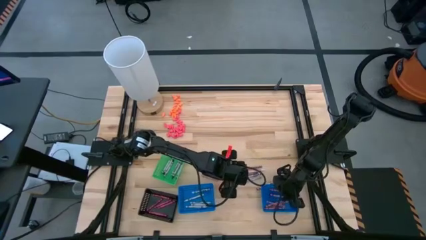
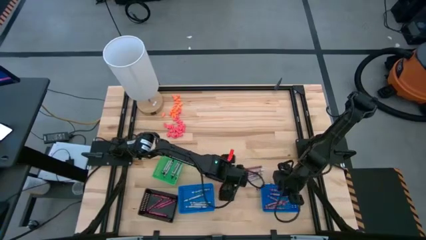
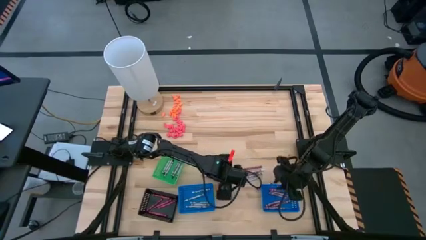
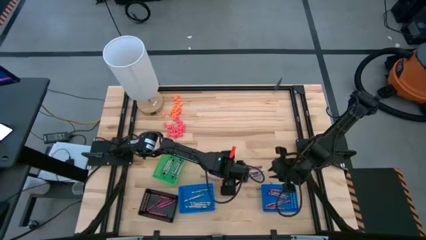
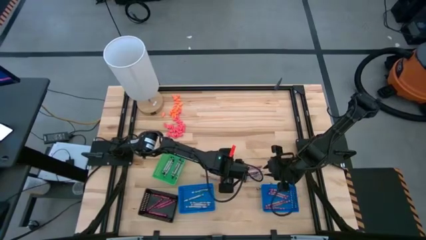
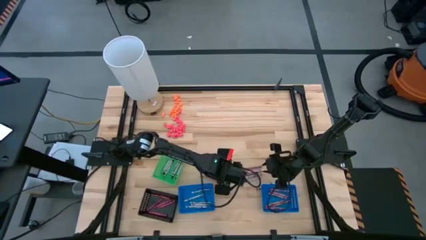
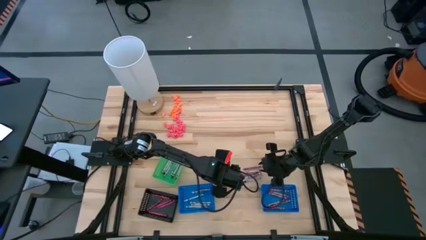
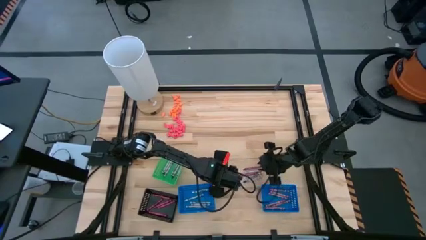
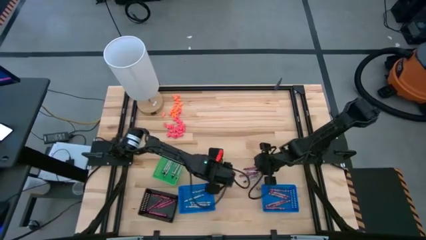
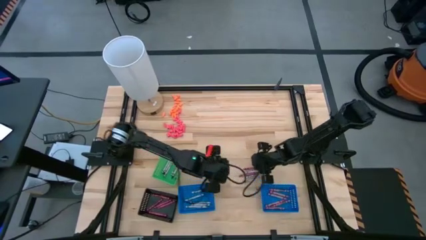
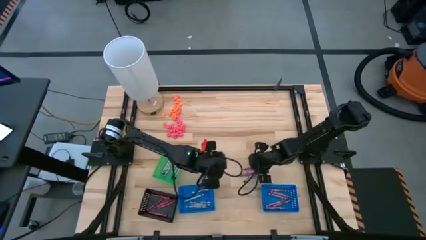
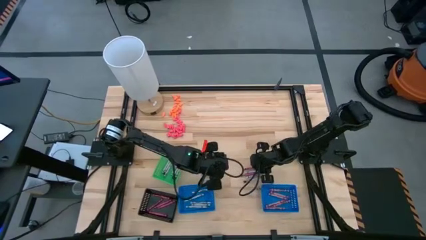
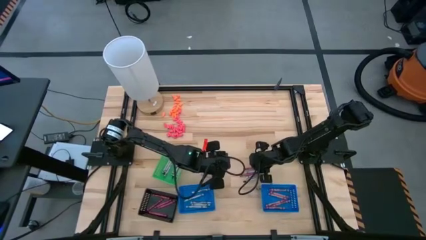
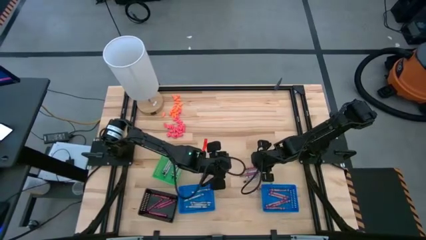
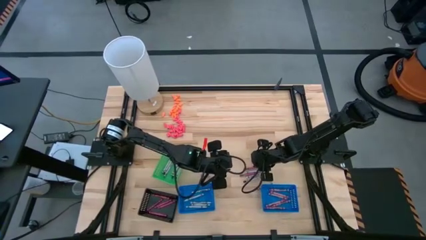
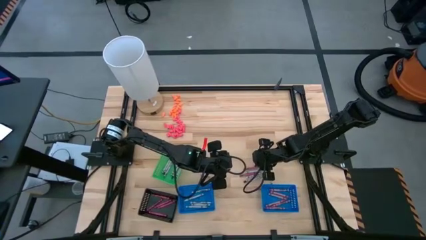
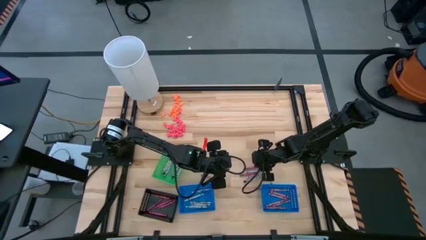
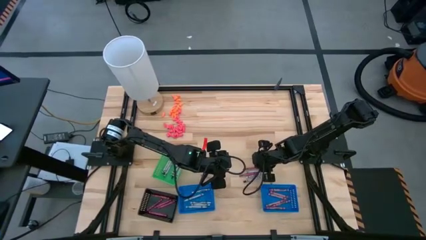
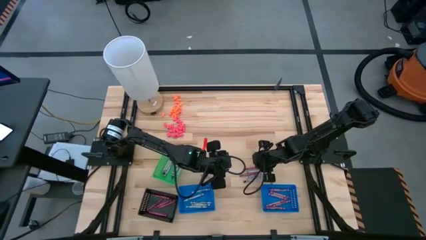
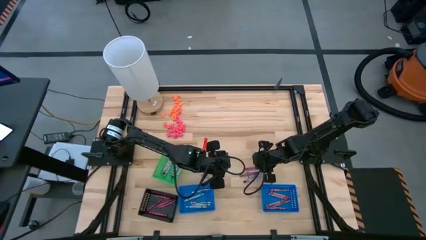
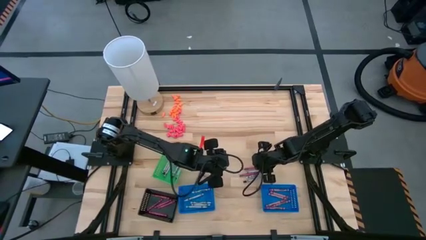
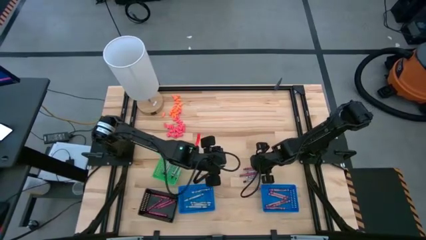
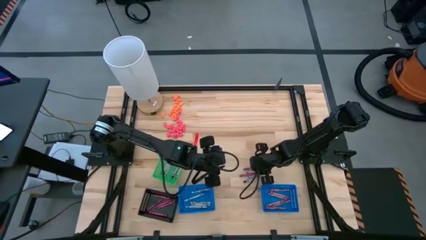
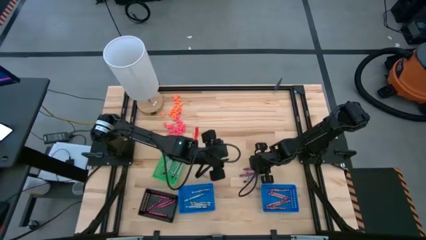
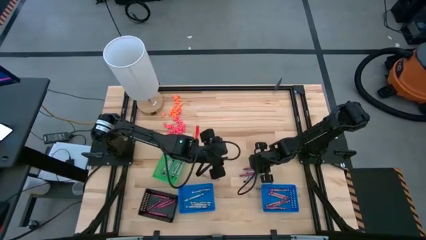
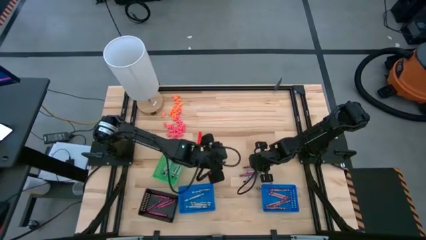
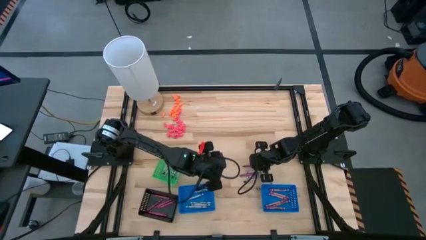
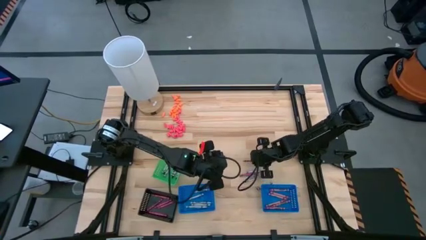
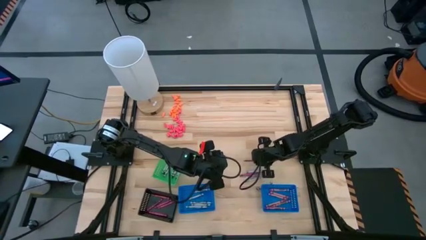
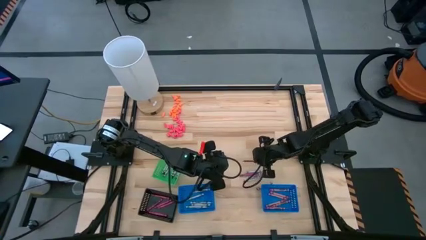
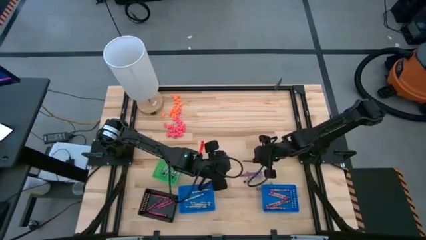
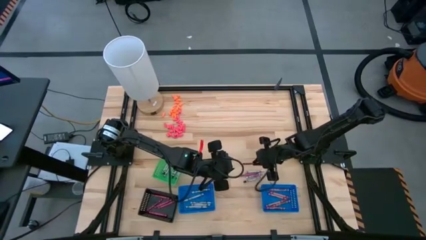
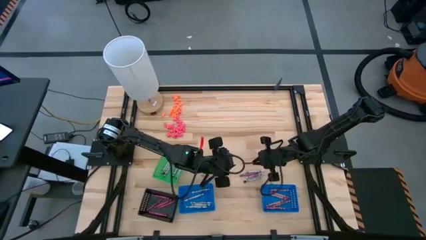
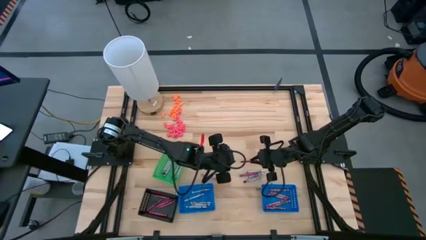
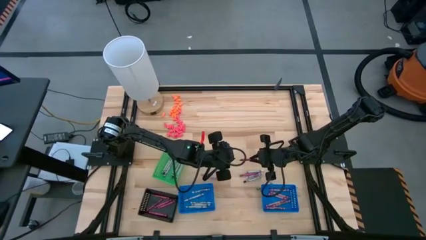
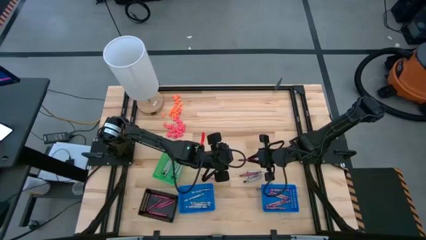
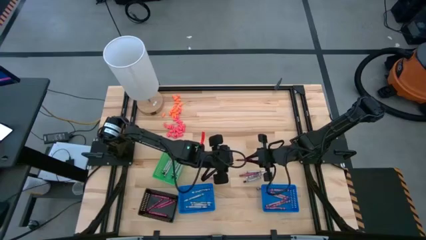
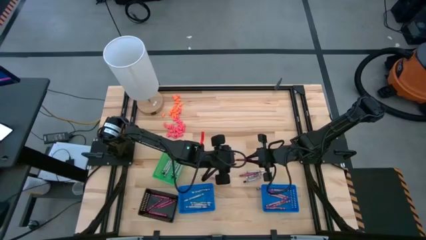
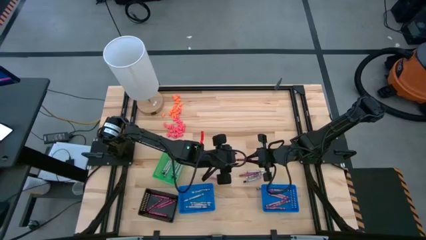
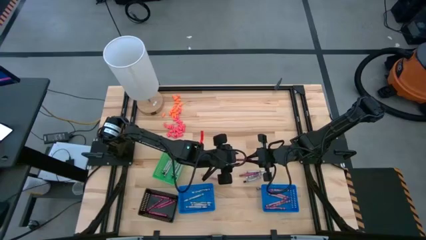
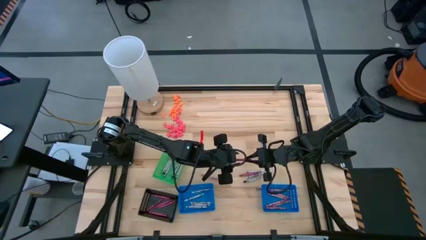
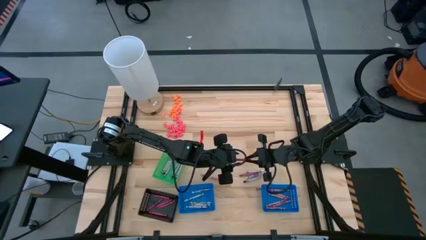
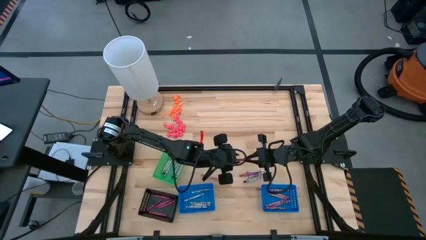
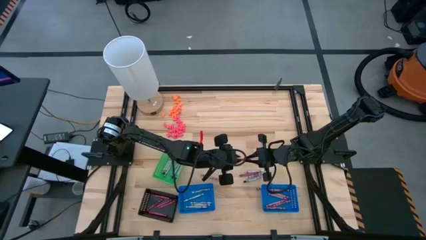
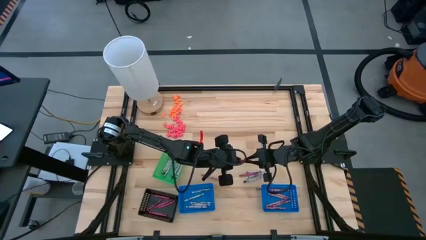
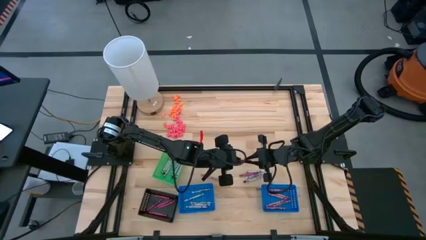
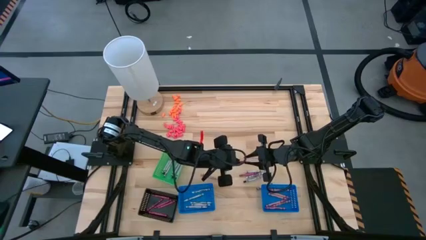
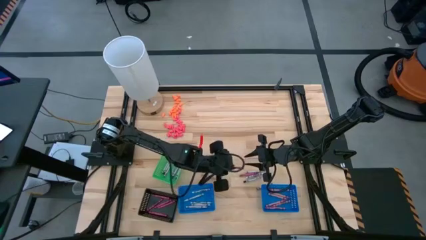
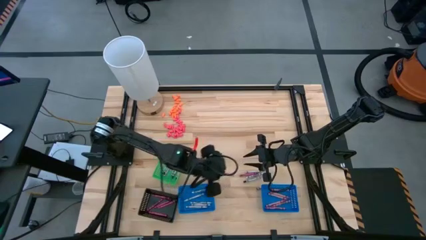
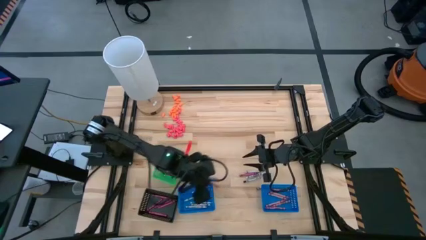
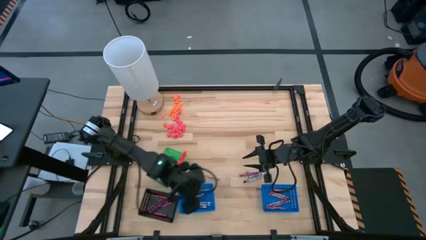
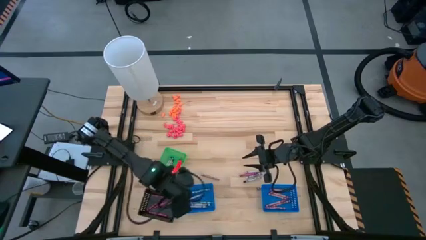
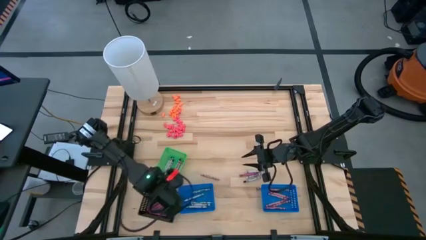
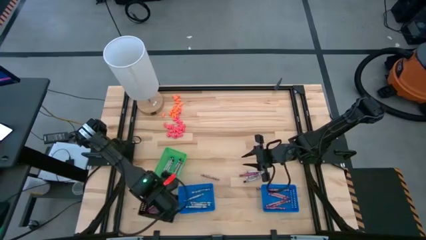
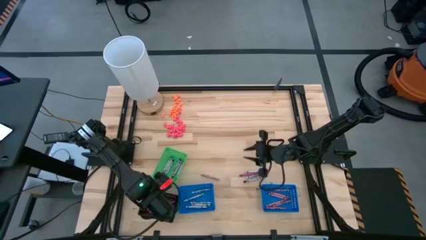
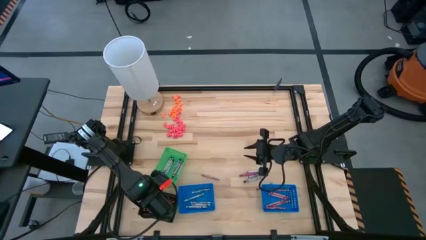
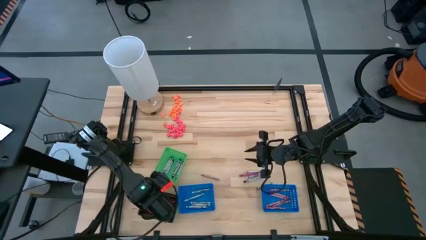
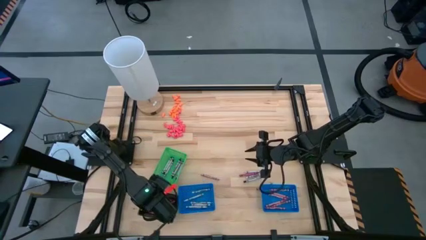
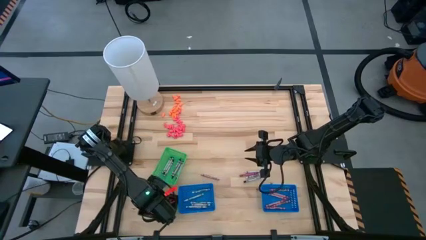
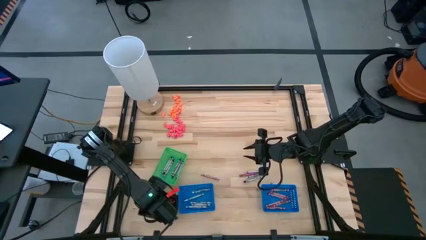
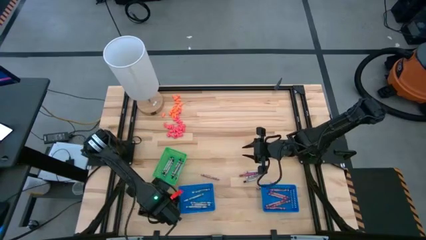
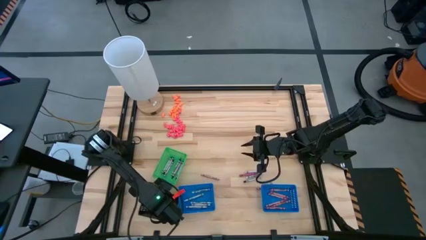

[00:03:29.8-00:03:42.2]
Task: Sort crayons
Put the red crayon into the black basket

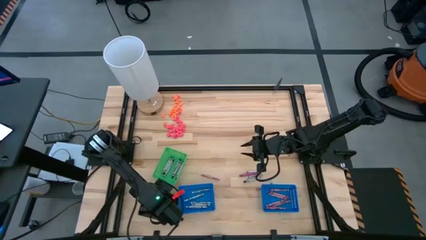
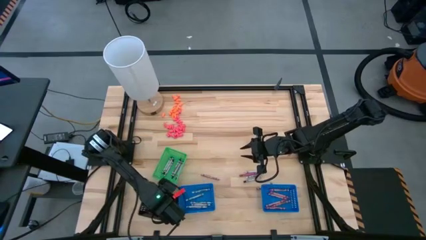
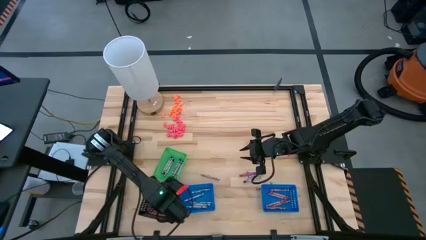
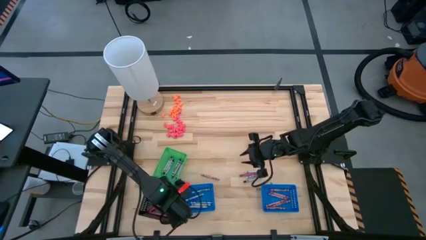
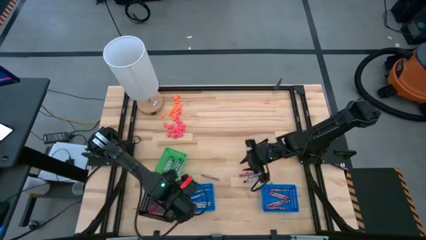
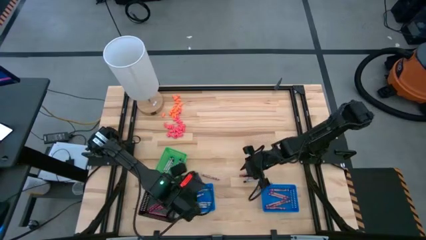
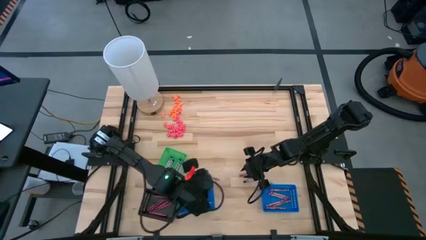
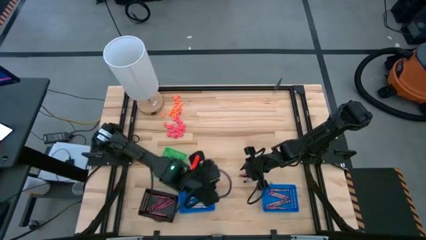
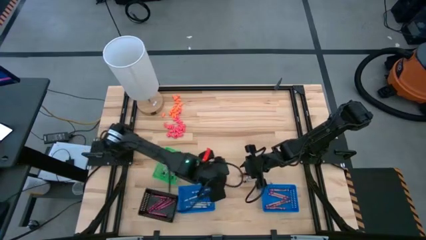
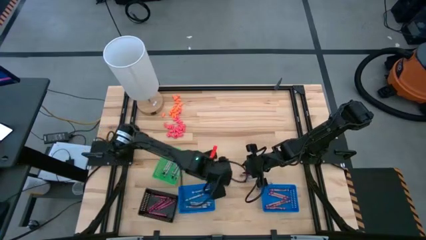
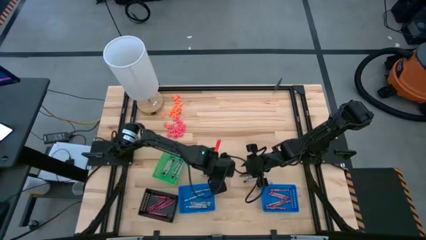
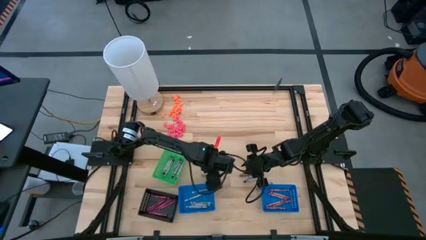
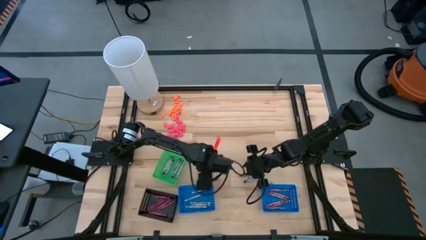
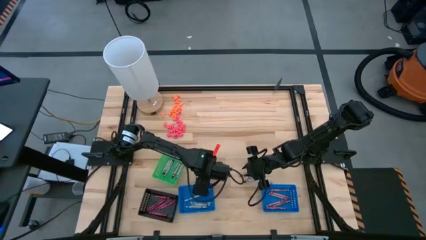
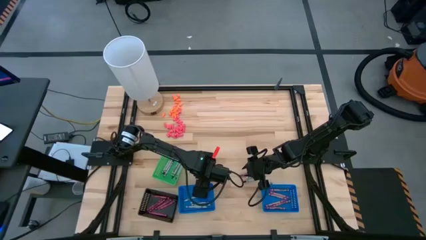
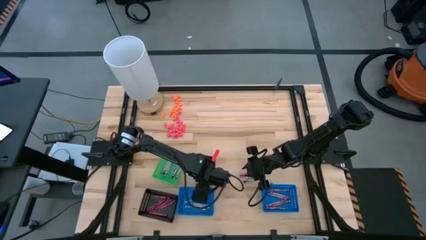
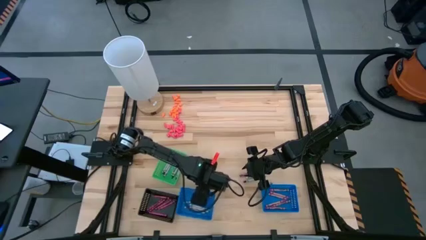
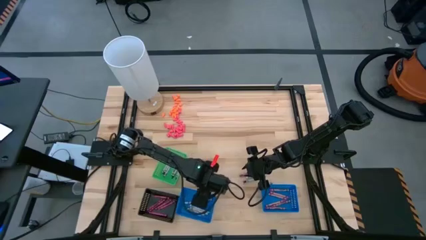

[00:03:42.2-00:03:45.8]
Adjust the left blue basket
